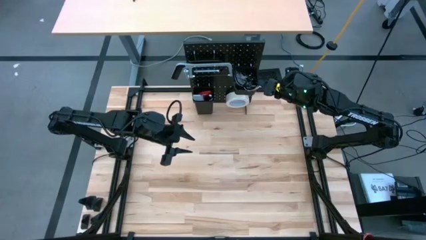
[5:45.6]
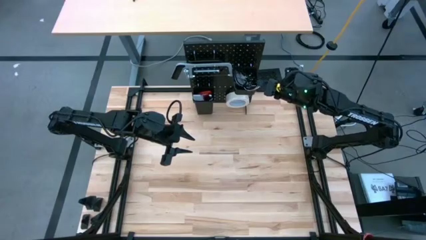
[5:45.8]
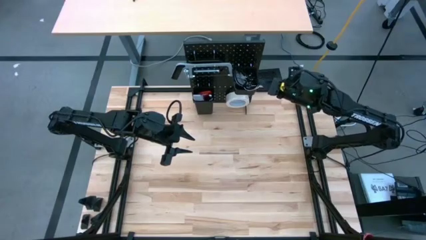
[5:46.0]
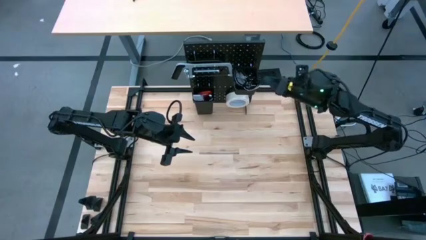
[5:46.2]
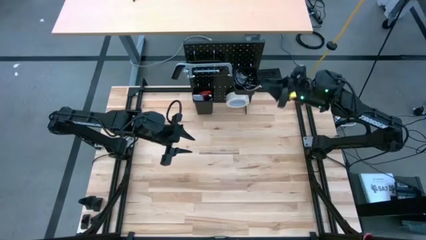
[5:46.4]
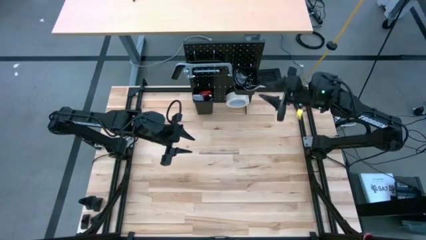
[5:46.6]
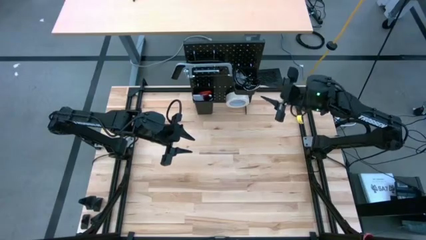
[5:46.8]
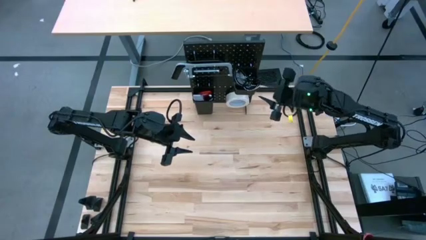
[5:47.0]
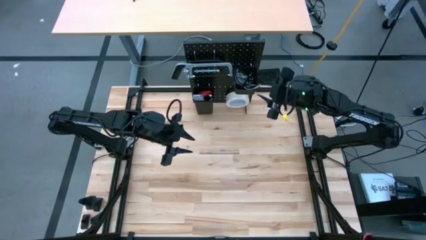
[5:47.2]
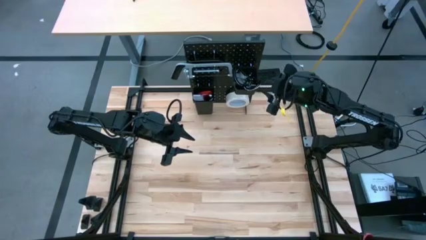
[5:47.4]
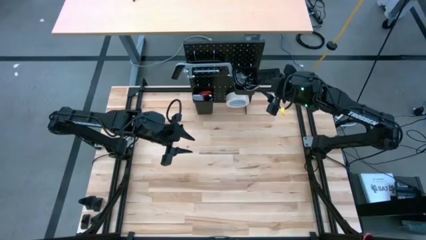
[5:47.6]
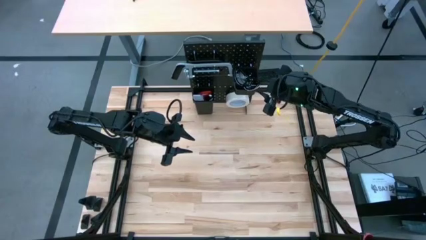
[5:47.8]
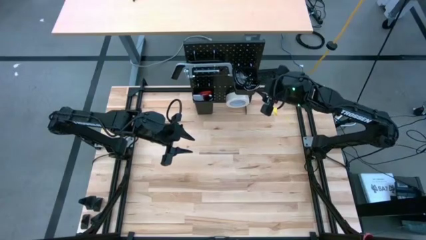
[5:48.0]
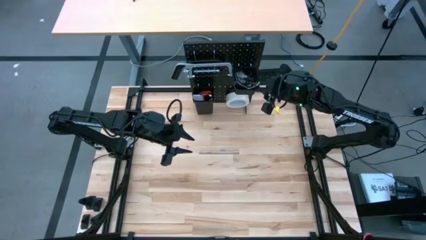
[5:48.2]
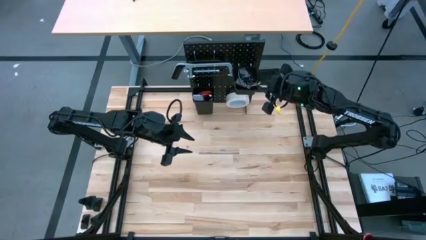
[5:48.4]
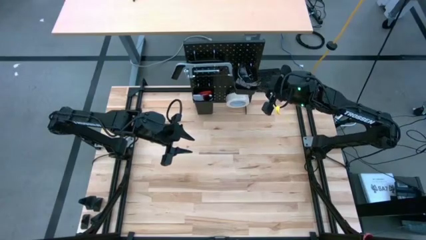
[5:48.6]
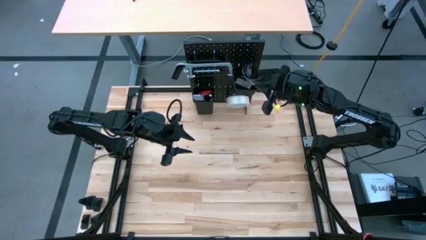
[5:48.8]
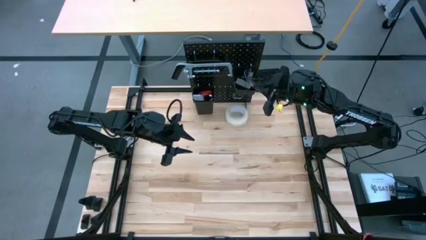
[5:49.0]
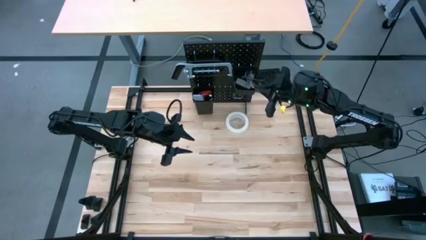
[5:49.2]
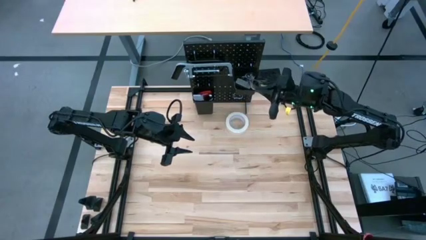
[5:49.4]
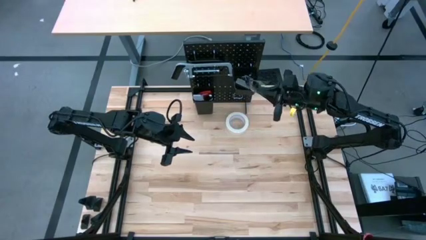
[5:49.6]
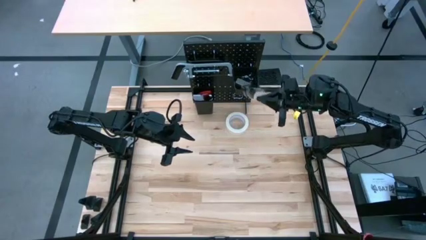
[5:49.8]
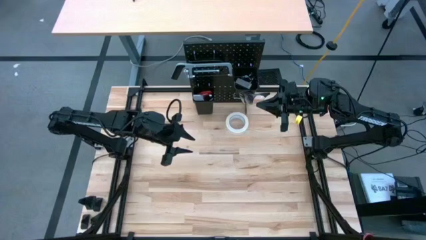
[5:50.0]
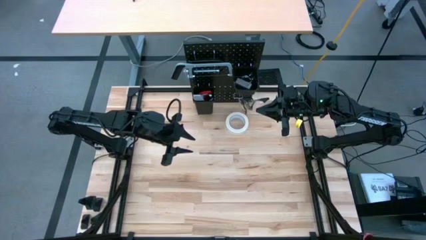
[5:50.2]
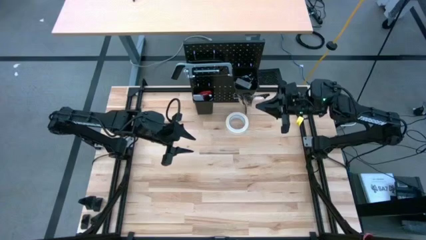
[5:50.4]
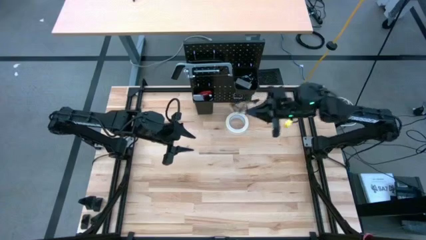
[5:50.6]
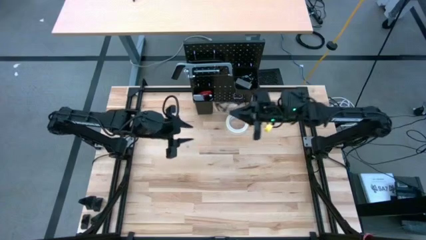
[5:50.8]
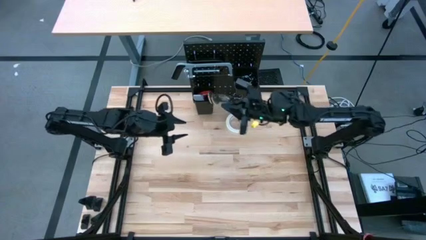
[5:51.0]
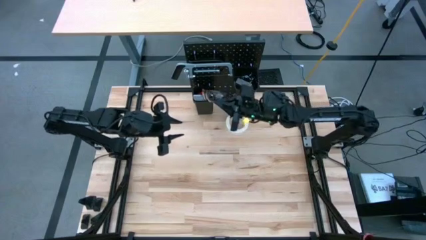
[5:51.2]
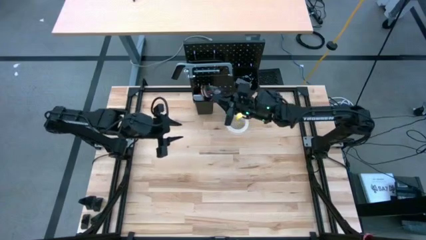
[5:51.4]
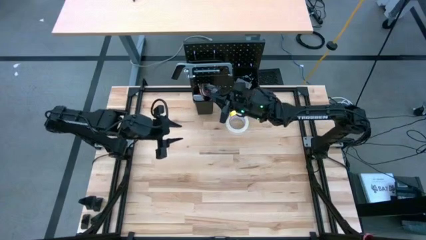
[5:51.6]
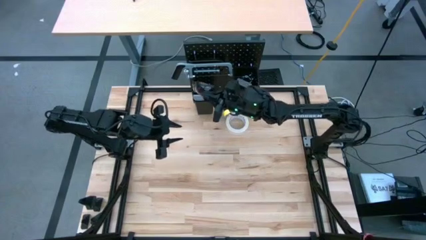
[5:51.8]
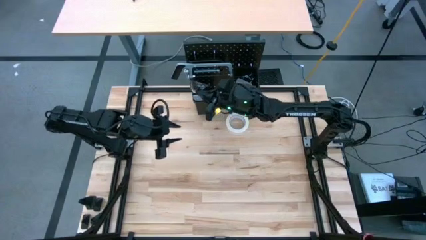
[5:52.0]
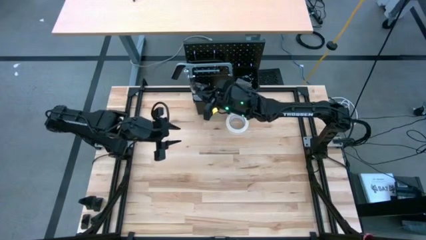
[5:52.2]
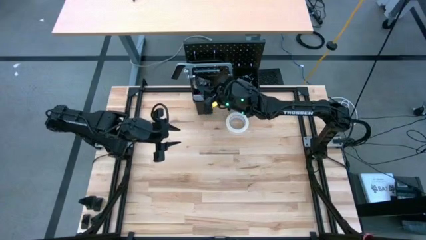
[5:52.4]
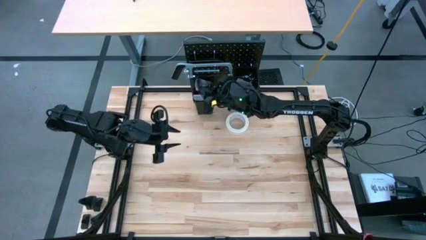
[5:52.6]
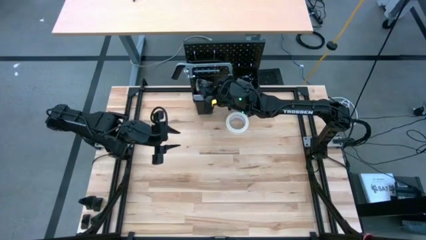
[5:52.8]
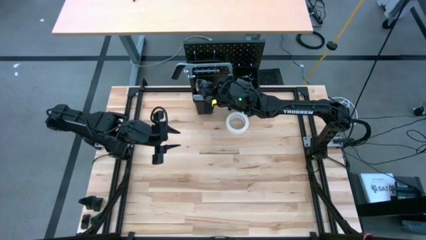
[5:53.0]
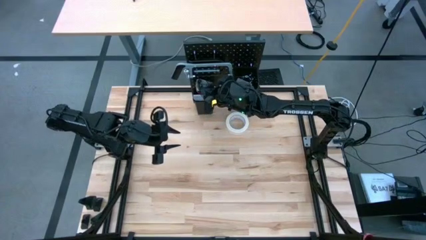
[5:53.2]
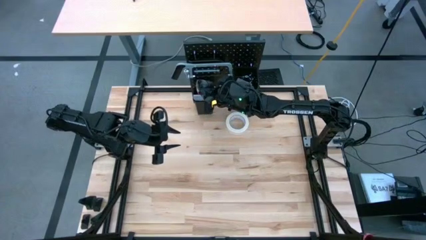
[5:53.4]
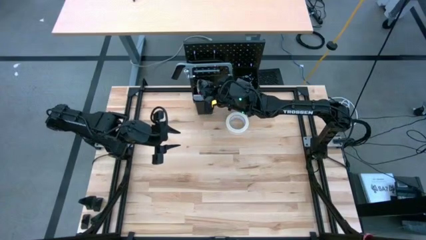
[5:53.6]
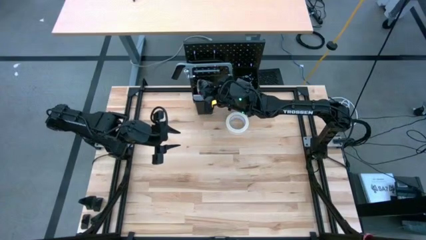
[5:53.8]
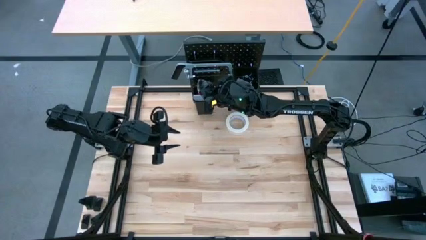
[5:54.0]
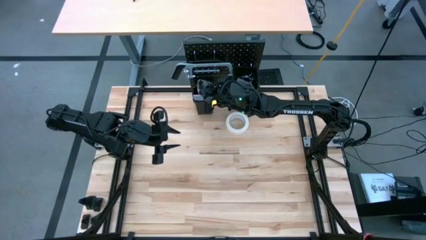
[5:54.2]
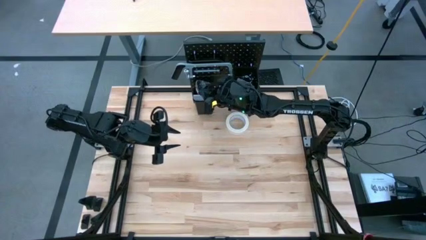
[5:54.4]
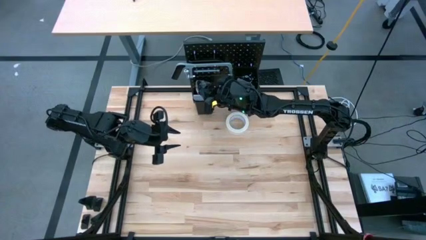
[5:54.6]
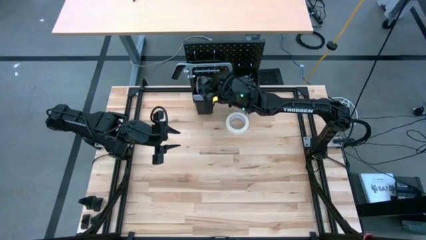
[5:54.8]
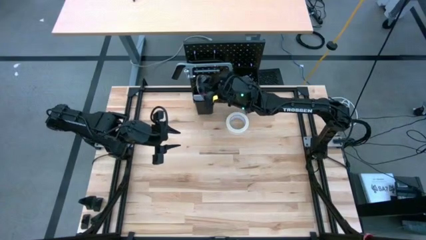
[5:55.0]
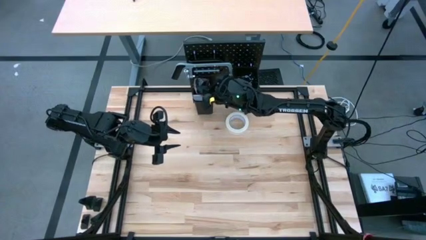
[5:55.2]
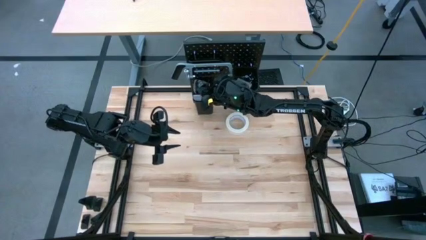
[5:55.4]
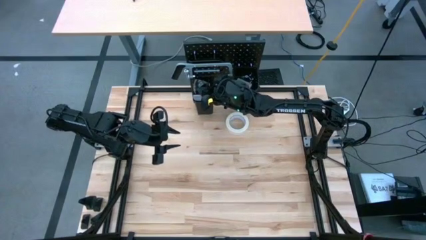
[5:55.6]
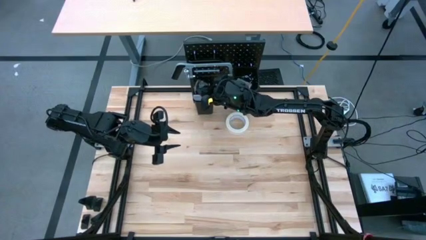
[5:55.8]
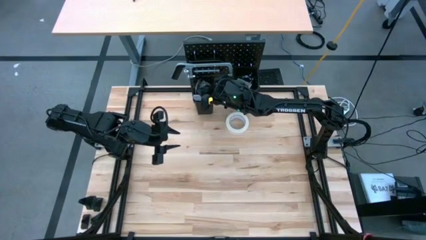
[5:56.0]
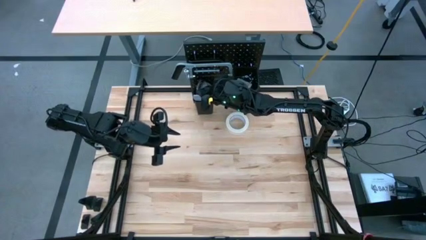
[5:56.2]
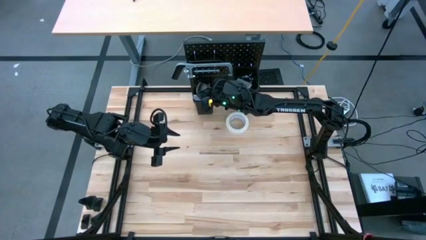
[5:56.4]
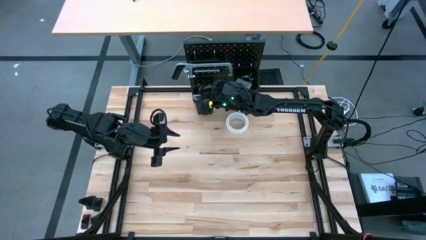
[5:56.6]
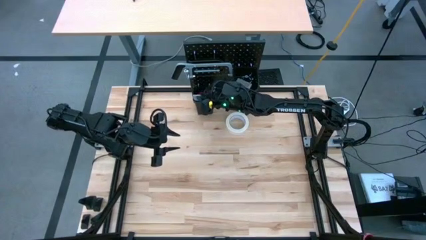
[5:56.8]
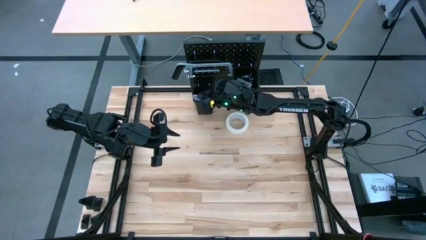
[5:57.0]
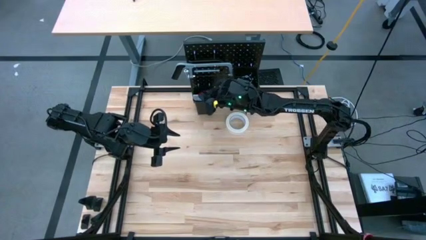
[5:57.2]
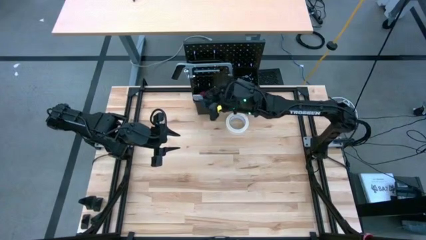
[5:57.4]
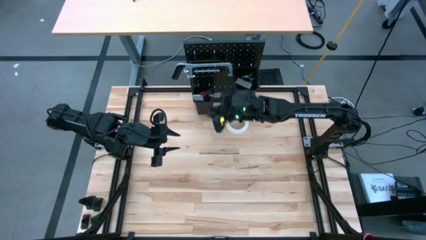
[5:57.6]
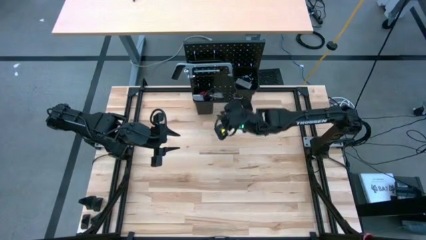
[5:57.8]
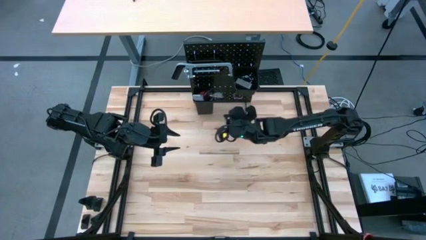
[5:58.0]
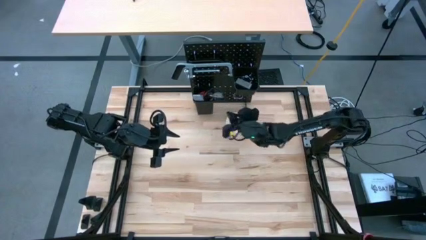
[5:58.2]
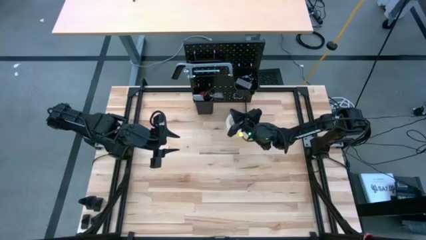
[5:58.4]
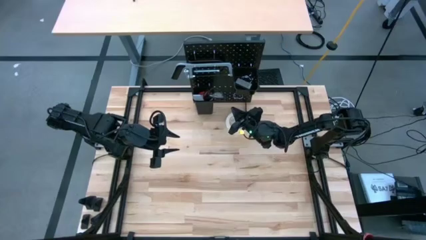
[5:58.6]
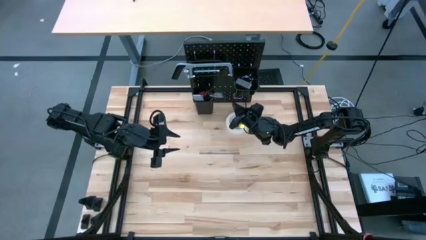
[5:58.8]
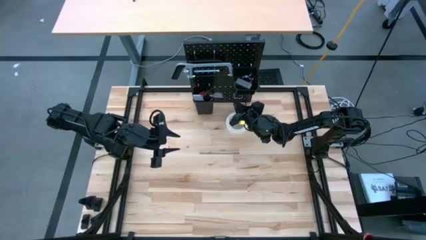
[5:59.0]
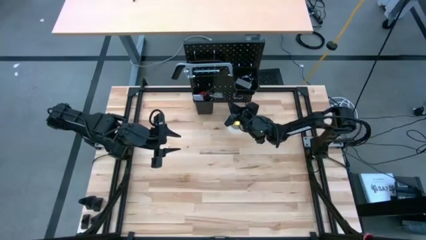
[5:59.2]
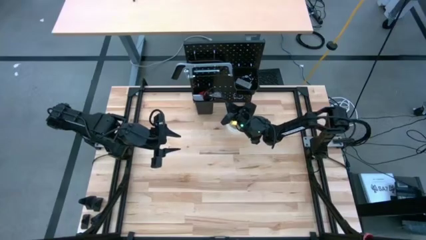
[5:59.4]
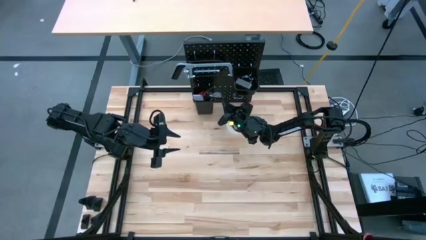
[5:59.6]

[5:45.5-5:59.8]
Task: Hang tools onto peg board
Put the black safety glasses into the left black tool bin

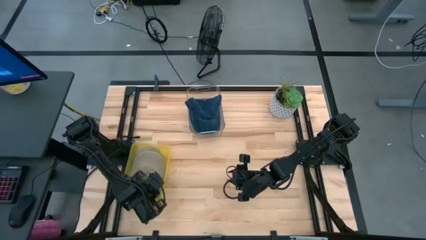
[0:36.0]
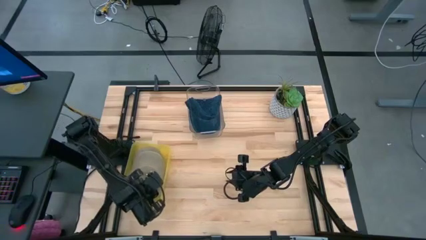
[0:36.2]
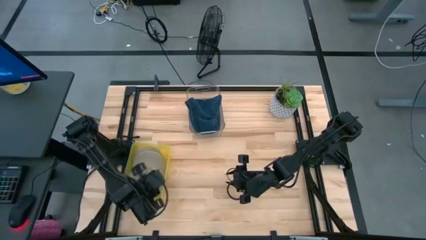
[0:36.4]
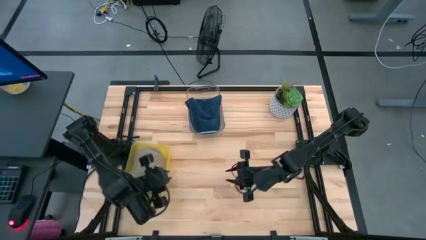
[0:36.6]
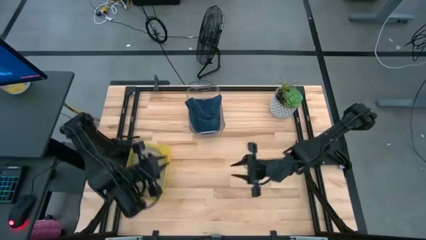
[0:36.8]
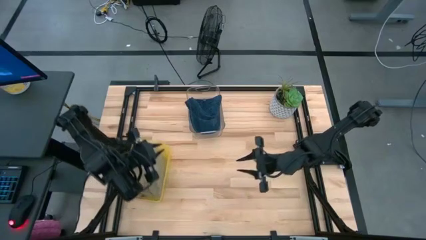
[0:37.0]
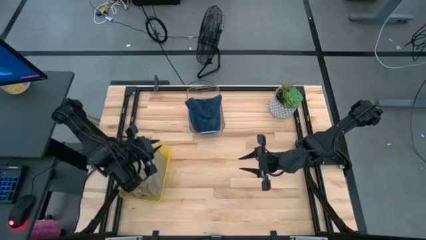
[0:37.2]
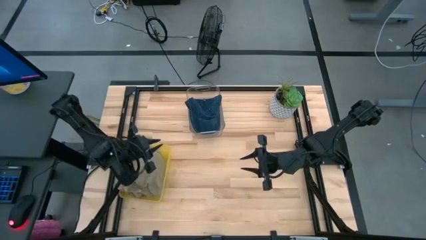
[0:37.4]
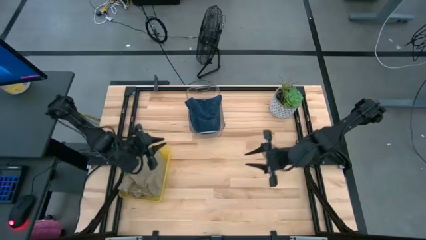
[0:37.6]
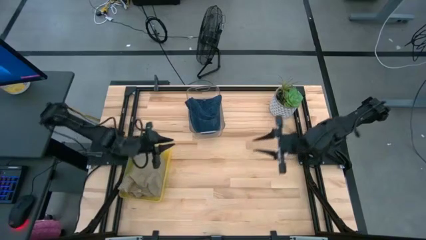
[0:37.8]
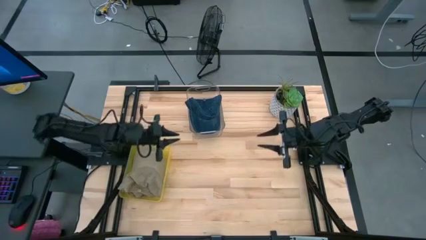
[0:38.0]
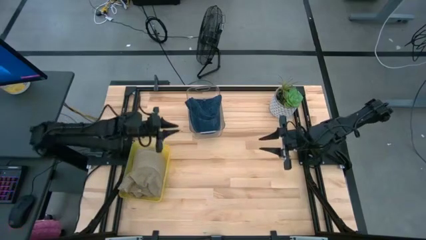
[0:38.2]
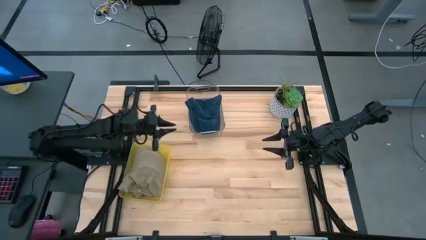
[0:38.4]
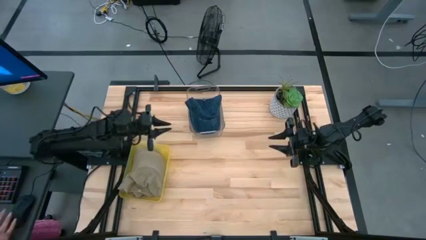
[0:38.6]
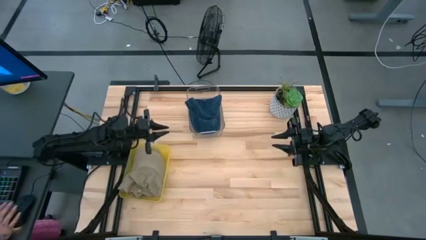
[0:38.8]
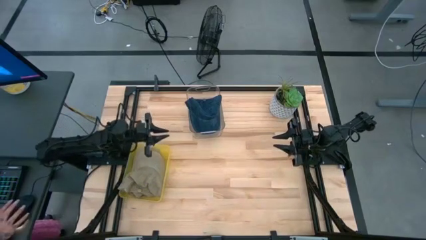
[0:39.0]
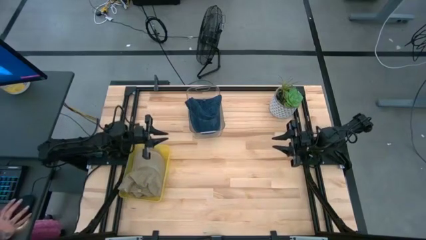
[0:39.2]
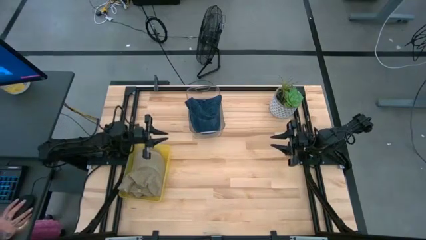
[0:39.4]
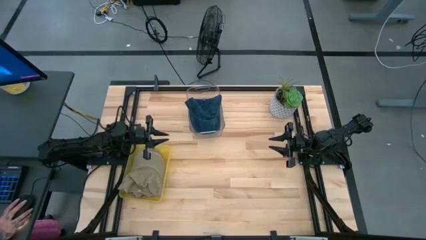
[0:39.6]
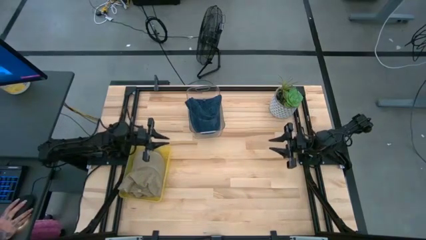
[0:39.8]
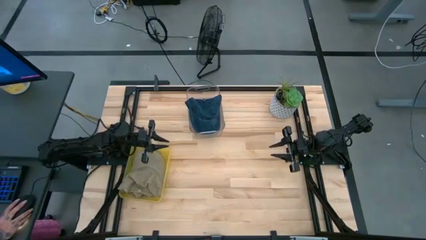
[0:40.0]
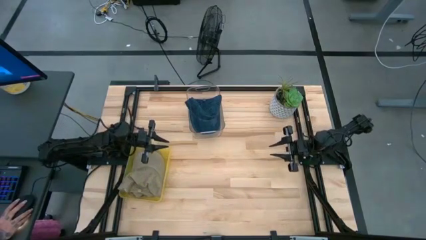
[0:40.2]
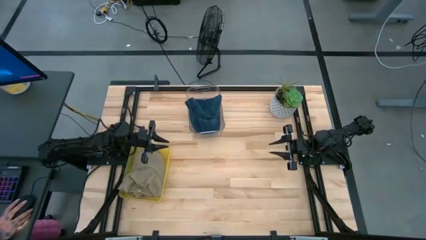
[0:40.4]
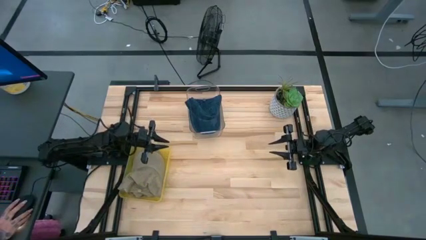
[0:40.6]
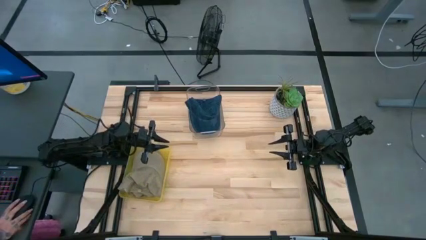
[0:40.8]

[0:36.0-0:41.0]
Task: Pick & Place hat
Return to Home Position
